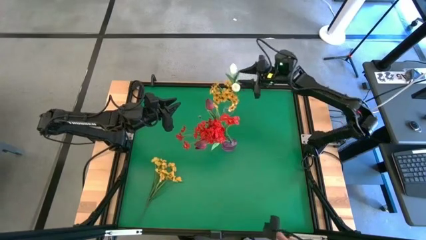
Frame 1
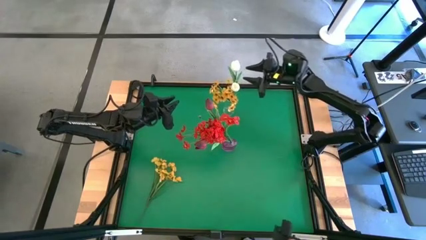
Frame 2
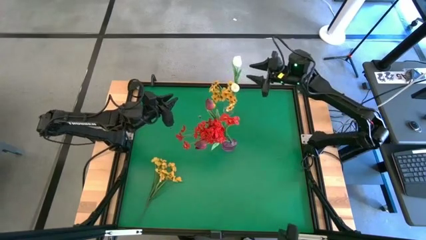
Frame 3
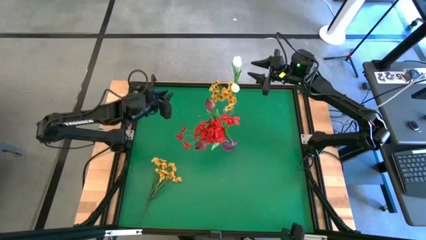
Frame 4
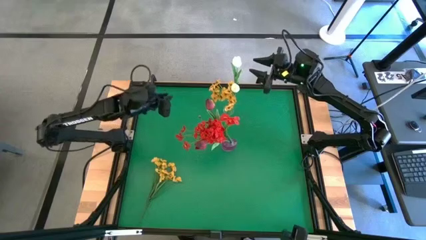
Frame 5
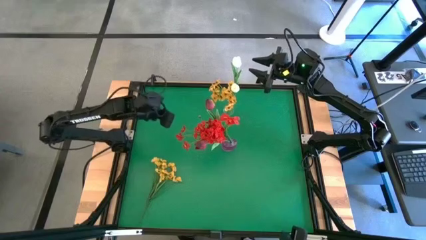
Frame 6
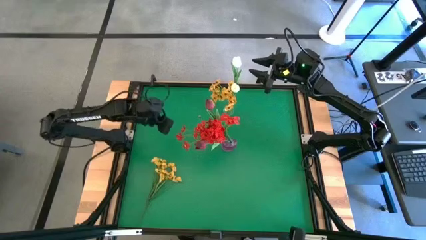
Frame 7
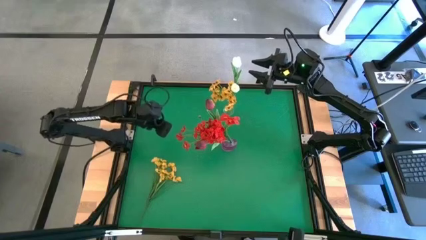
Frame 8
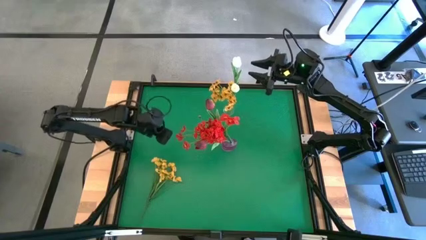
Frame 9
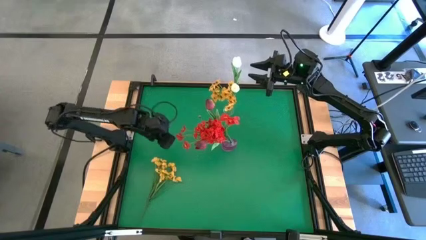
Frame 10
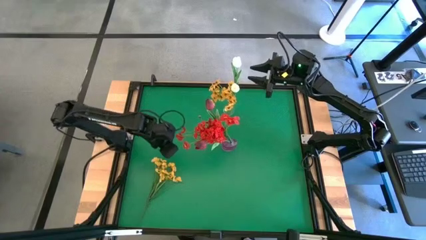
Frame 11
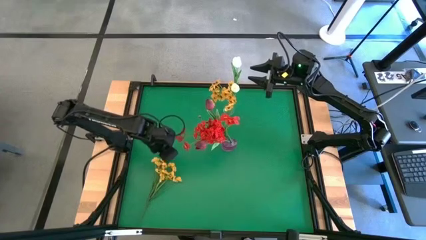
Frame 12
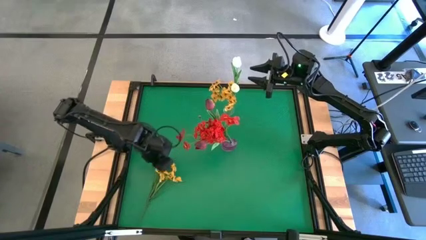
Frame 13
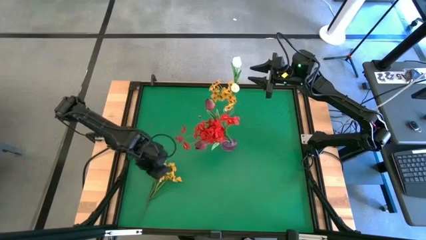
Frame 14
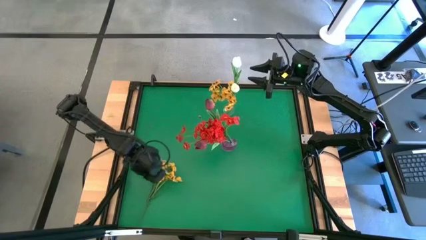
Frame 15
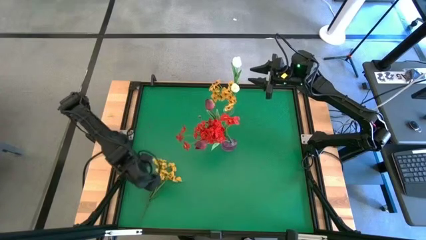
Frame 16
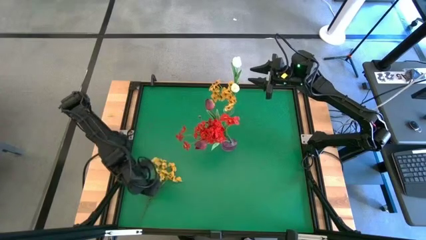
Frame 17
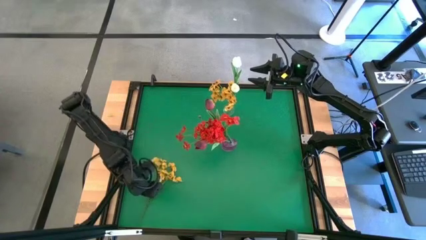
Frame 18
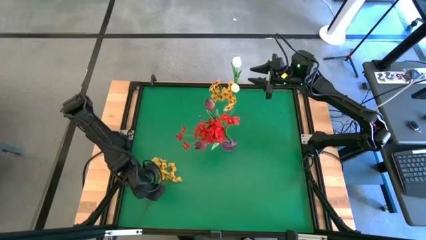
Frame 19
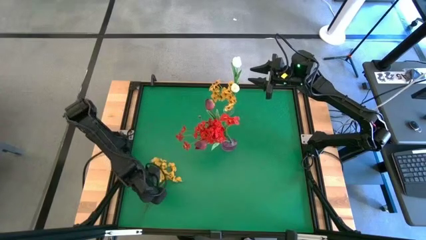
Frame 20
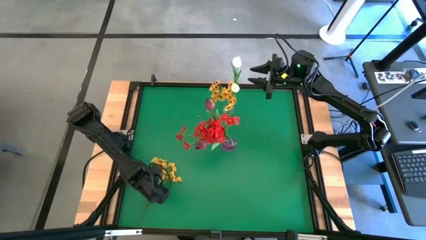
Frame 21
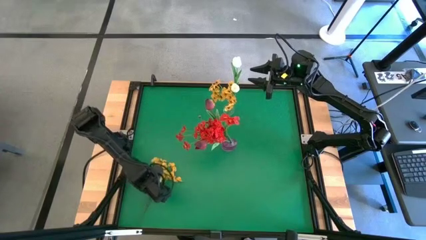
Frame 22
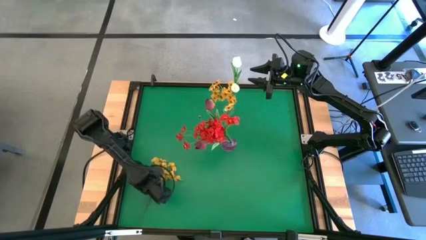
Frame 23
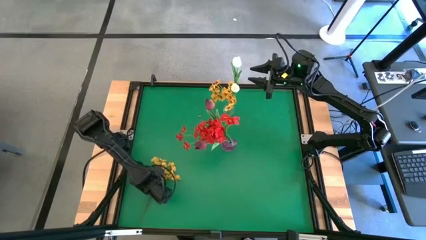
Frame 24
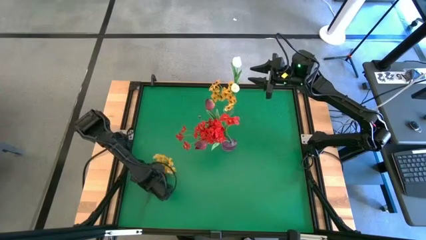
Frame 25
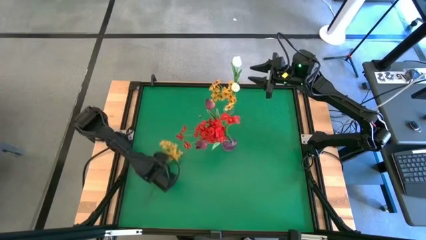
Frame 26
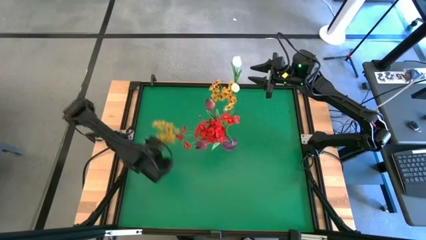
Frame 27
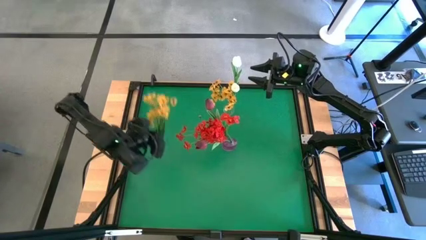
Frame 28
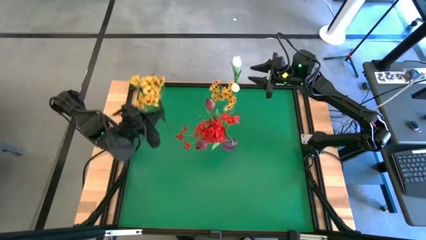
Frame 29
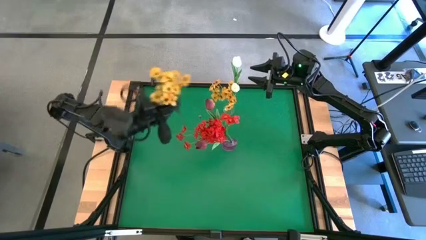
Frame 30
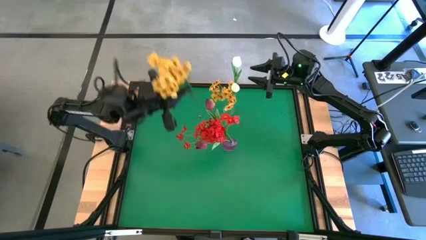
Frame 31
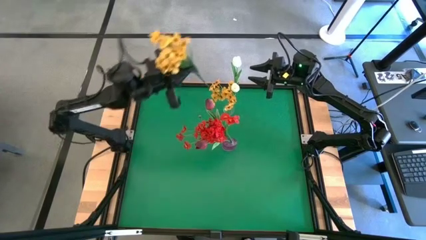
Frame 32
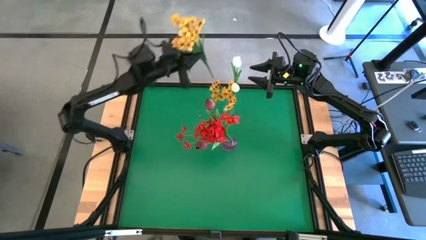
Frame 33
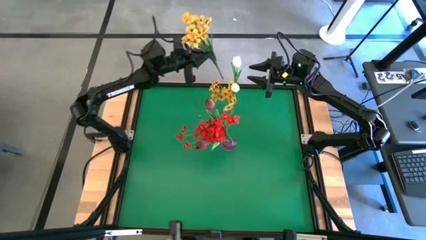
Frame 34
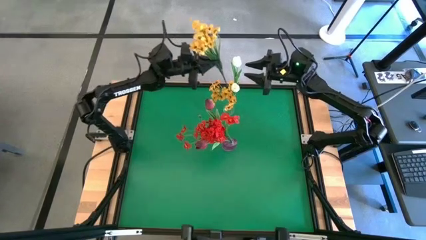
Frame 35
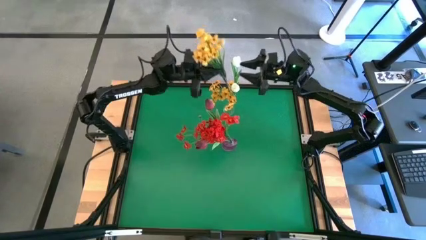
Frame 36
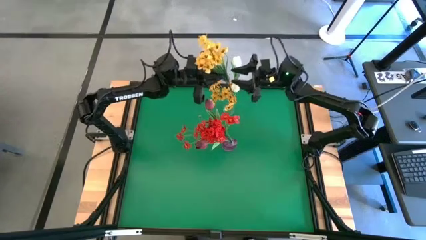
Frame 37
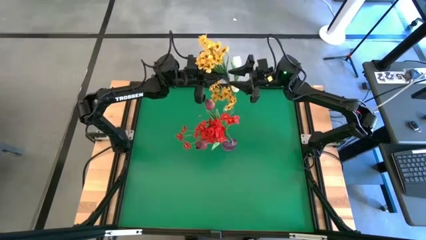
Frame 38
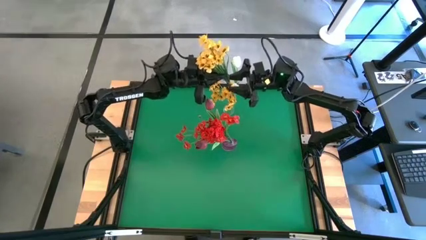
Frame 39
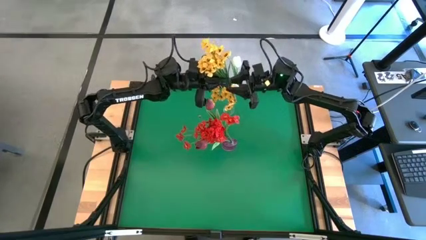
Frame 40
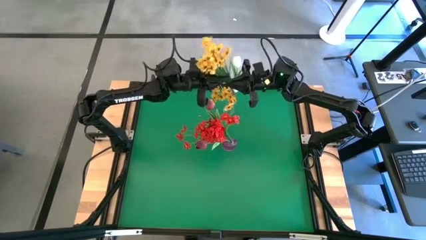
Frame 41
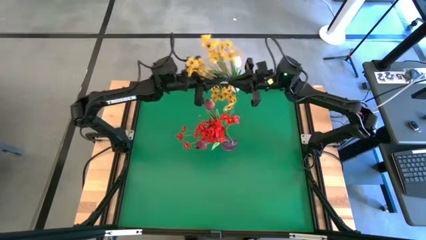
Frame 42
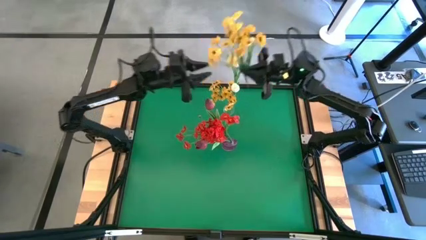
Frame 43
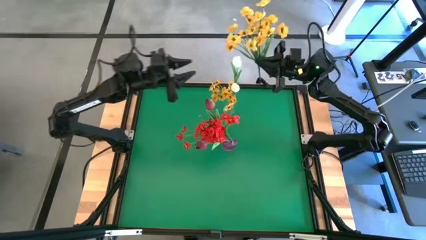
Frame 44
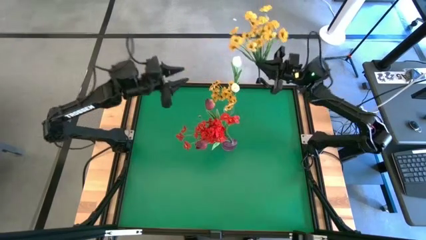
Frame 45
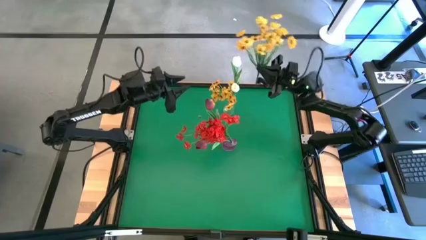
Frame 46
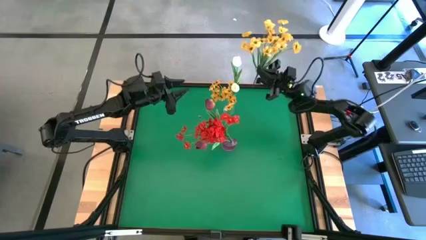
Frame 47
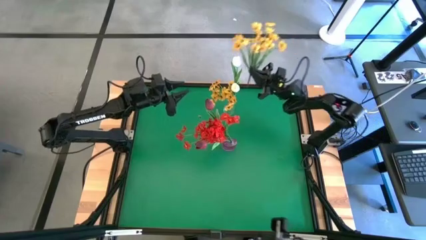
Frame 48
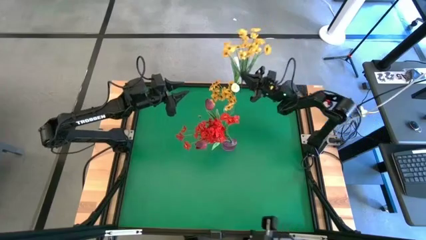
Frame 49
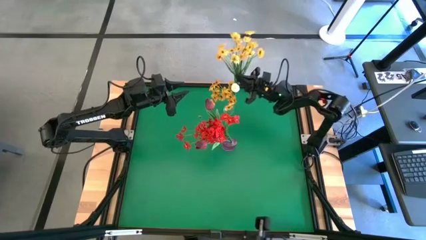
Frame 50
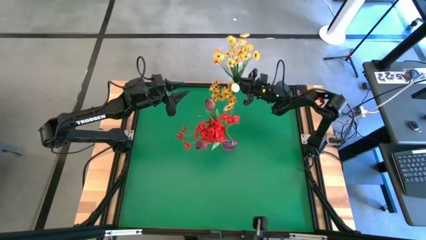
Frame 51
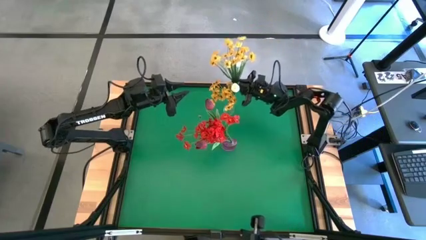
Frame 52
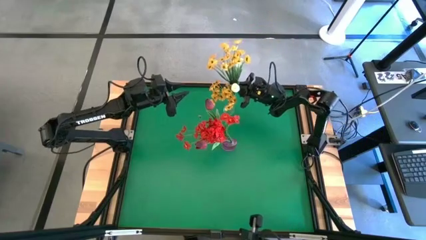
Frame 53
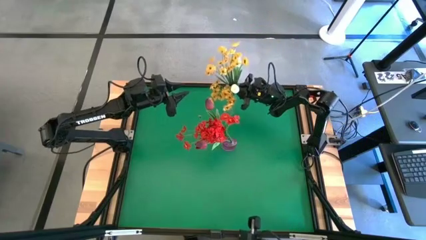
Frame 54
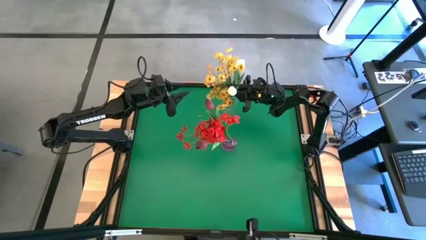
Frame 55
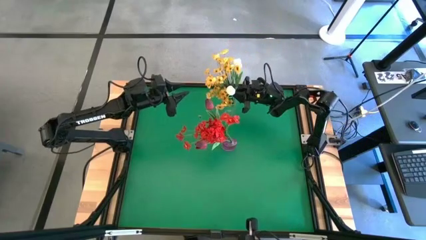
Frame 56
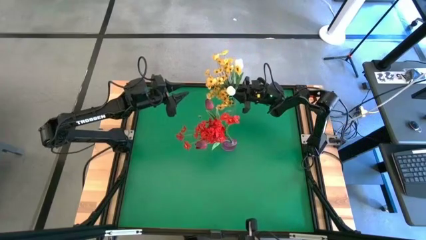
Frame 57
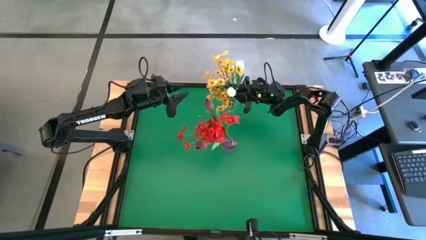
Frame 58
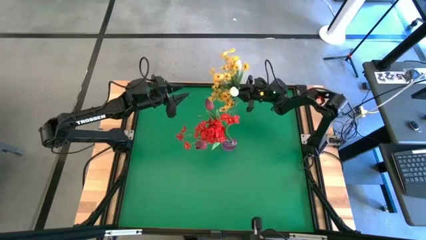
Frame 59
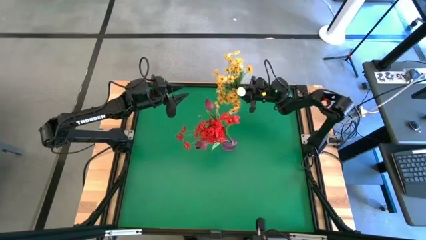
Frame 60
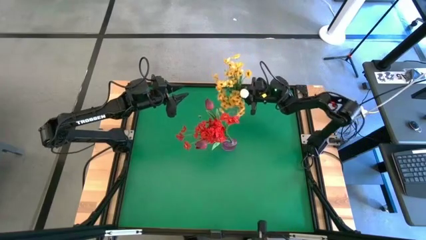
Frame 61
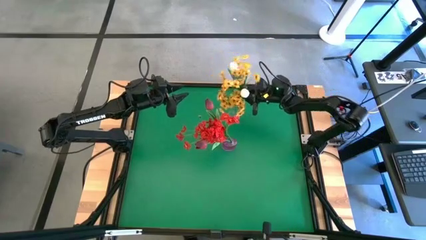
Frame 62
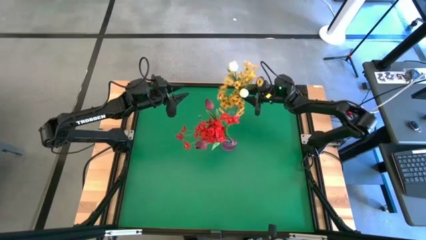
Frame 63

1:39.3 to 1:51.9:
Task: Sort flowers into vase by color
Put the yellow flowers into the transparent vase

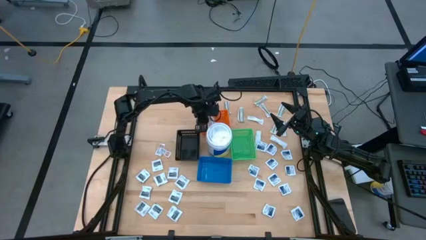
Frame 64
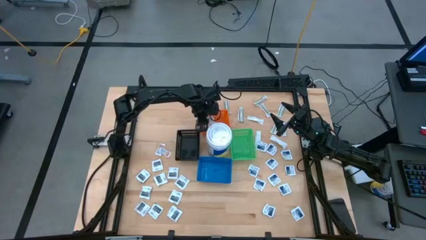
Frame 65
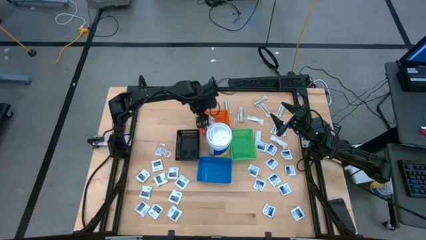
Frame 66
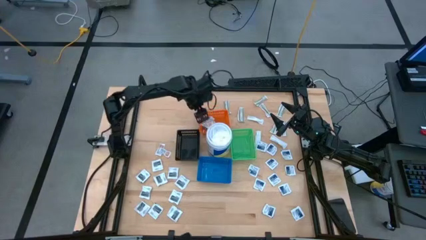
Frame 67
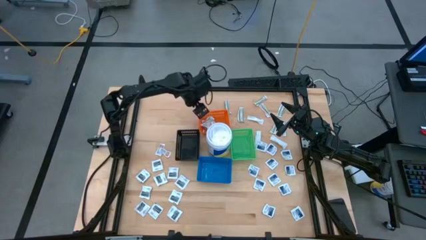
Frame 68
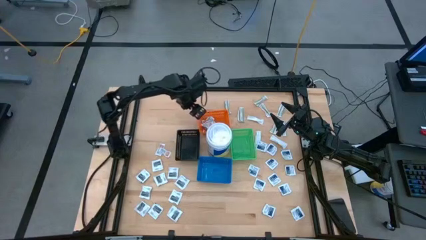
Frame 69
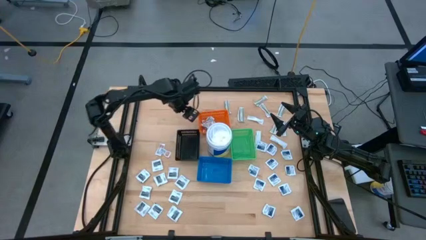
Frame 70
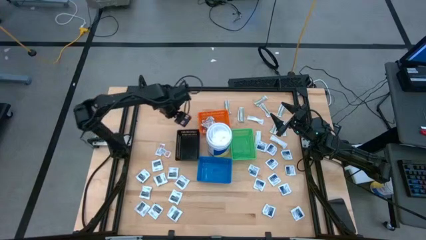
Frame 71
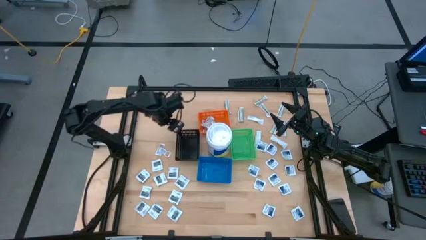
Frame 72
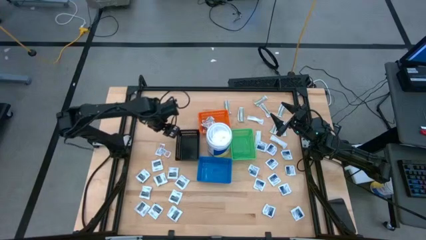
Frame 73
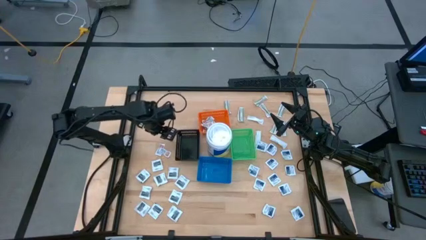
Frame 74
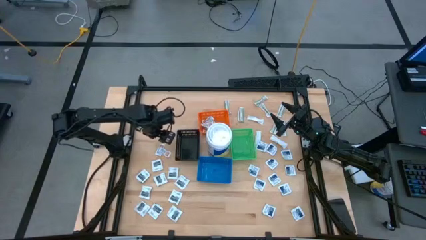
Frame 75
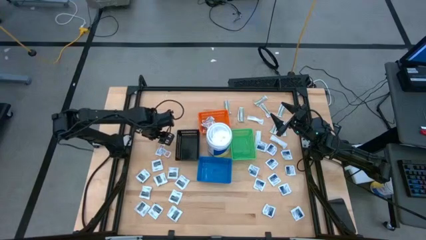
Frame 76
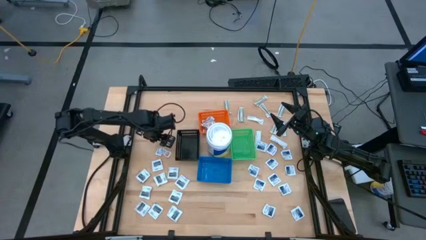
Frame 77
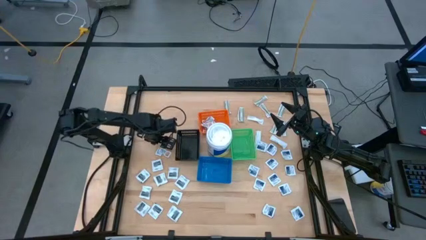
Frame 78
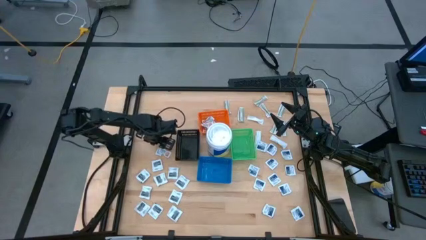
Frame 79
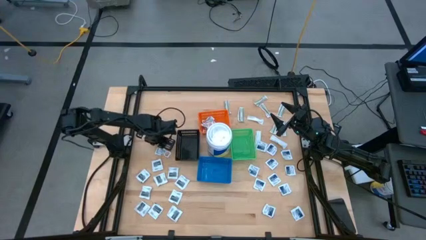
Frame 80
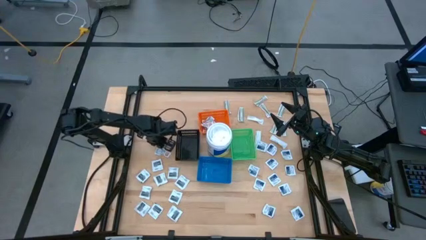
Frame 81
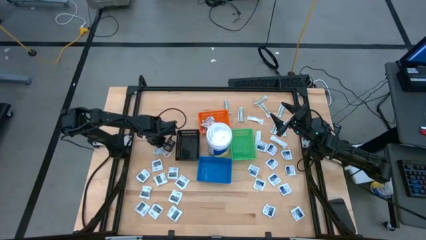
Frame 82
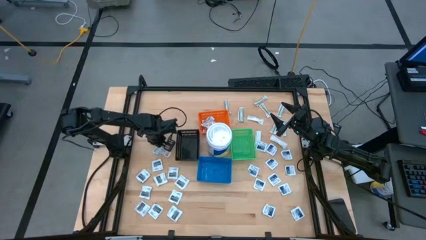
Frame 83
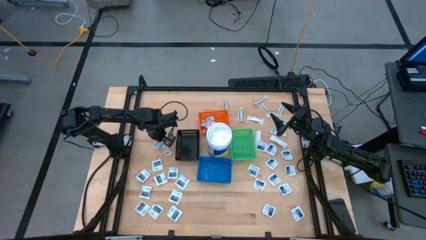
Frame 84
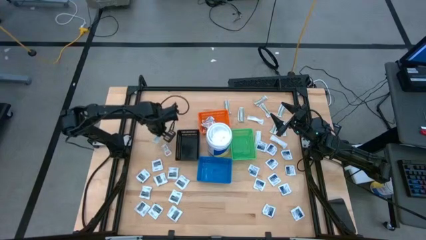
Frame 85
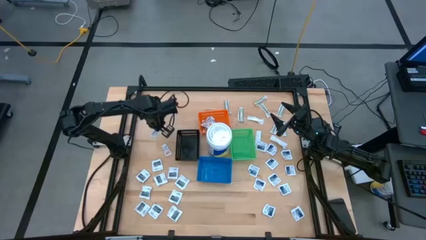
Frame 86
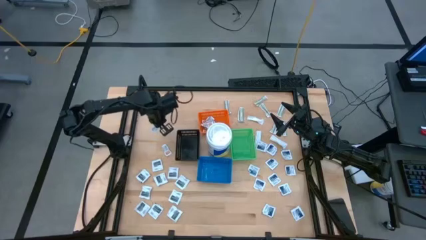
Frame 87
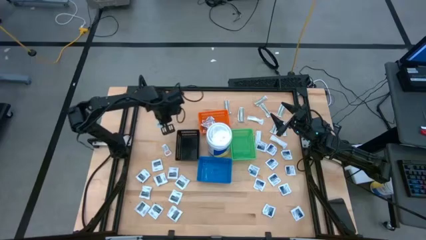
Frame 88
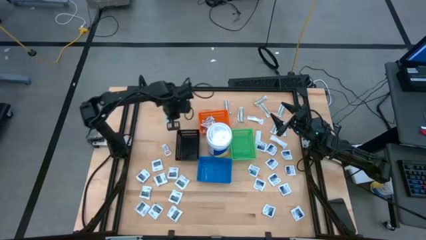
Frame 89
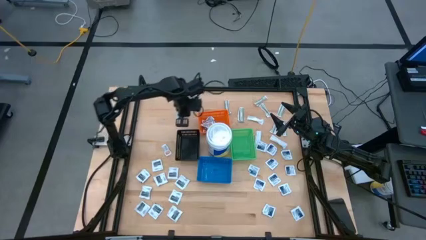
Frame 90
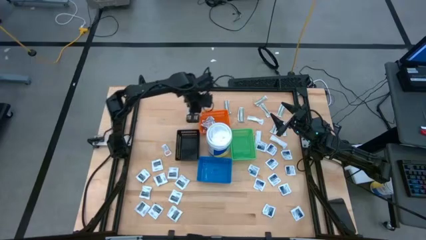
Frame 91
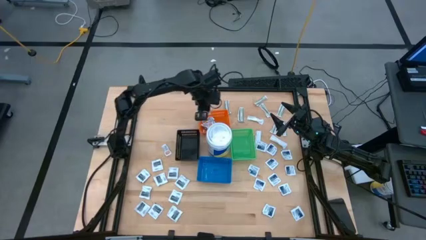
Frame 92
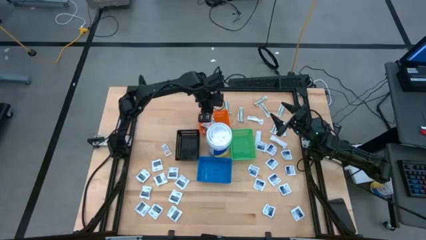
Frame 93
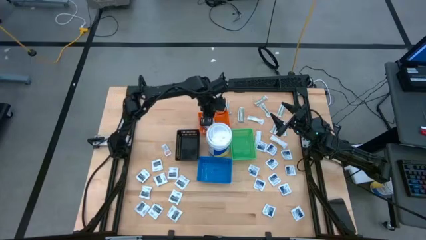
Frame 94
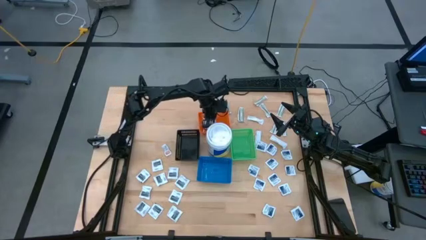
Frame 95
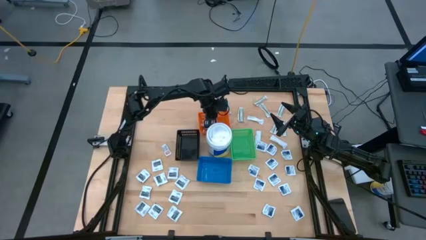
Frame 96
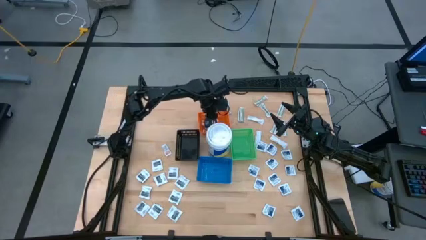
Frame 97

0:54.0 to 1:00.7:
Task: Pick & Place First Aid Supplies
Put the orange ointment pack into the orange bin
